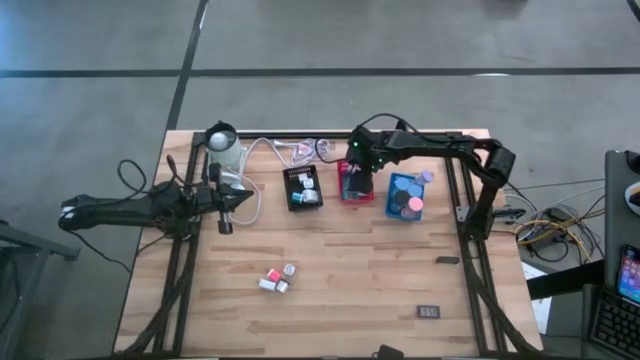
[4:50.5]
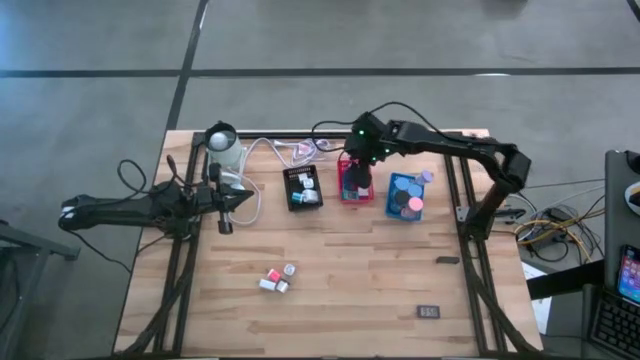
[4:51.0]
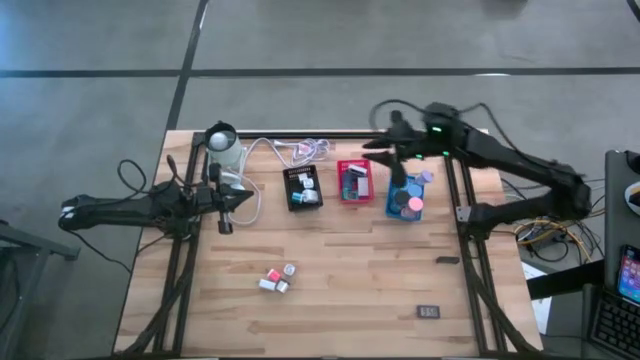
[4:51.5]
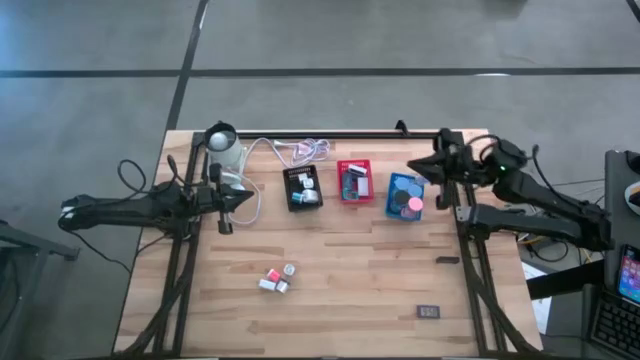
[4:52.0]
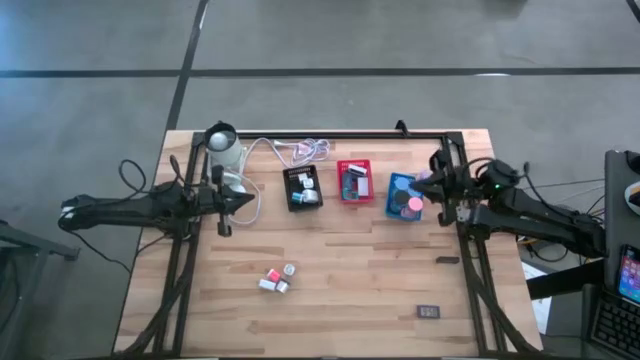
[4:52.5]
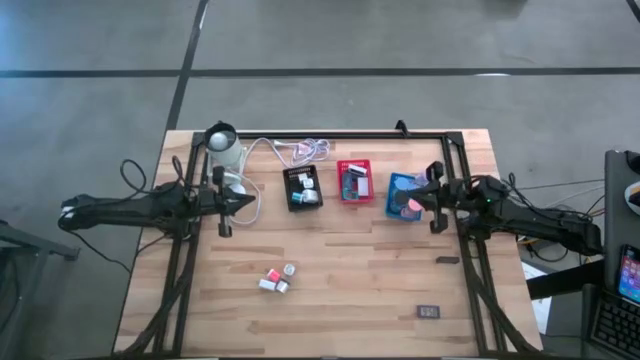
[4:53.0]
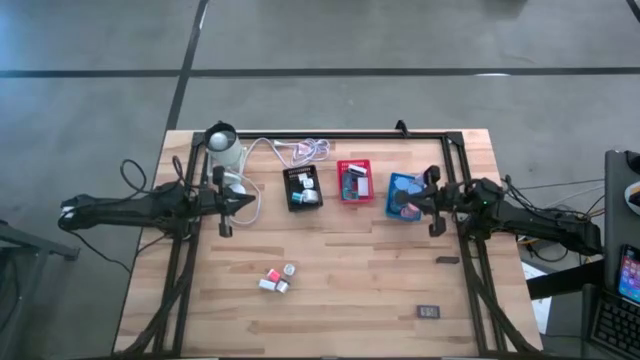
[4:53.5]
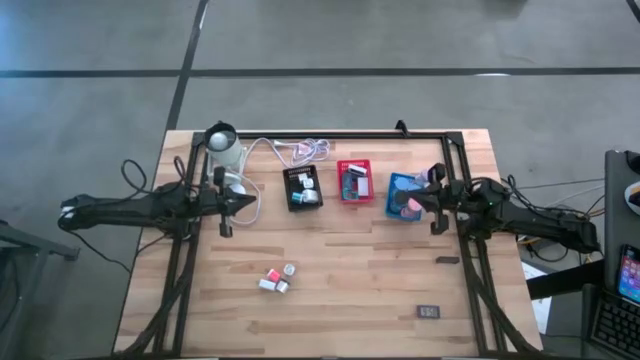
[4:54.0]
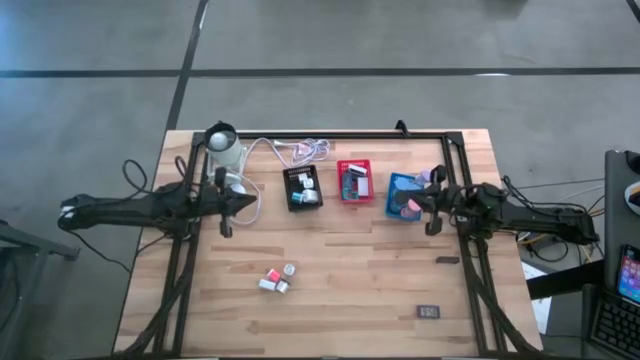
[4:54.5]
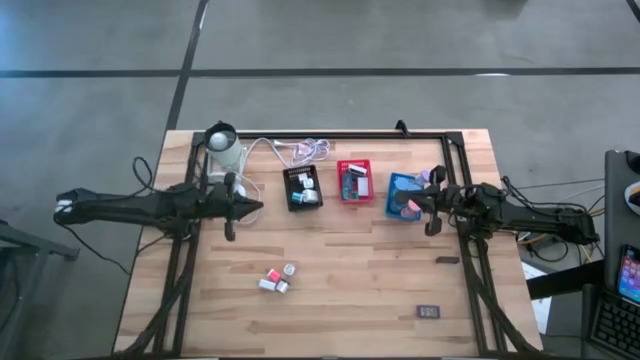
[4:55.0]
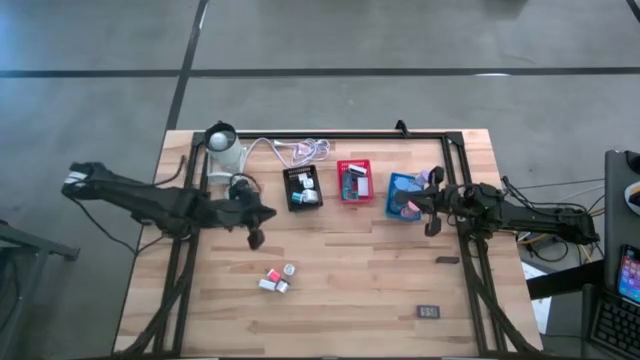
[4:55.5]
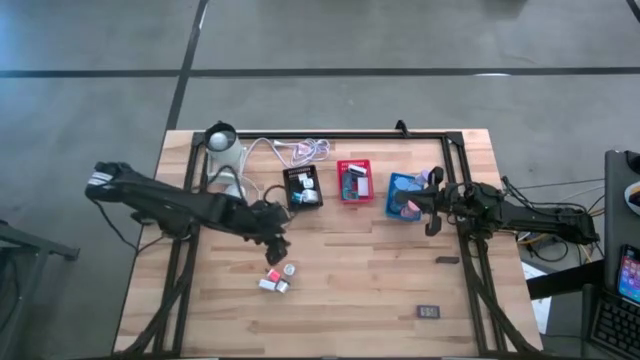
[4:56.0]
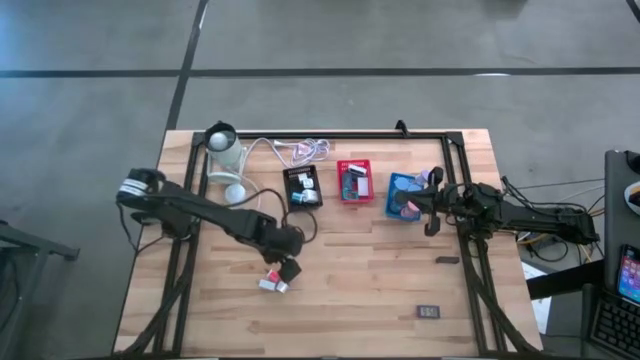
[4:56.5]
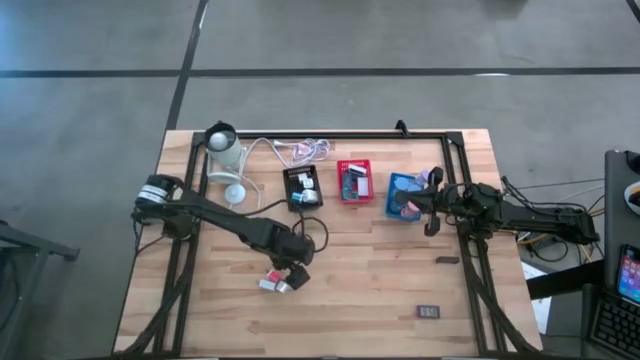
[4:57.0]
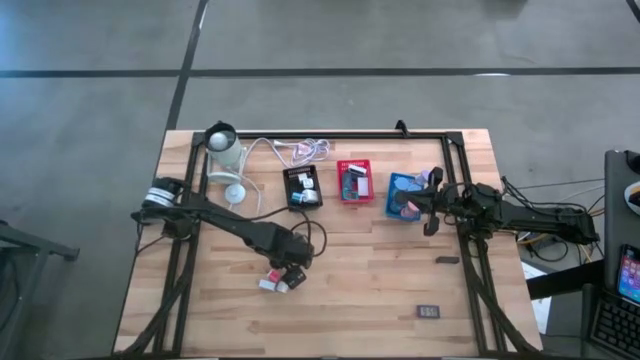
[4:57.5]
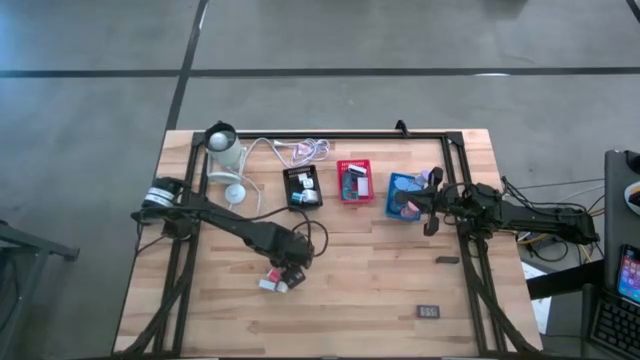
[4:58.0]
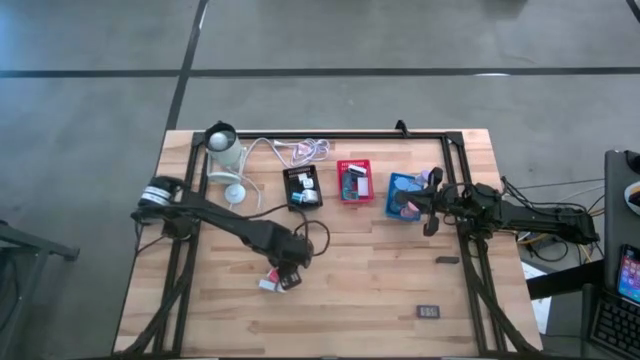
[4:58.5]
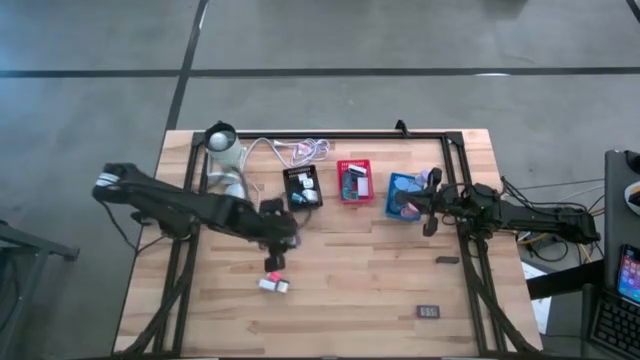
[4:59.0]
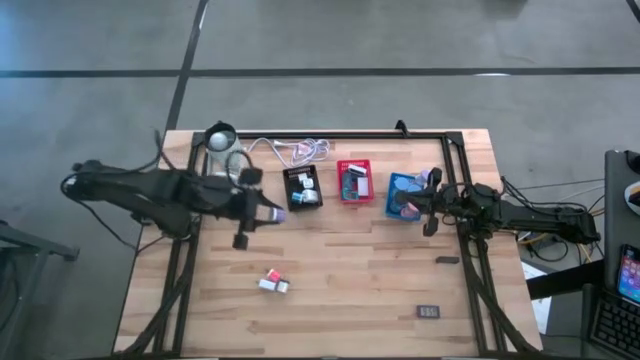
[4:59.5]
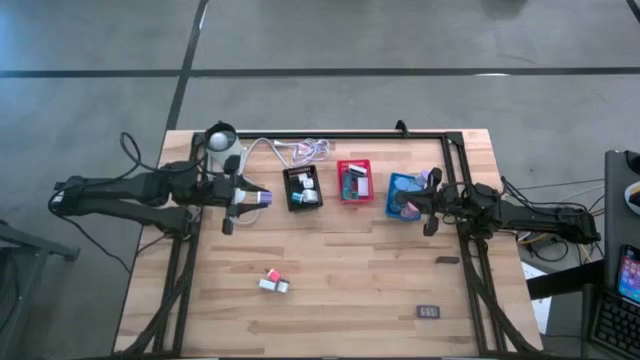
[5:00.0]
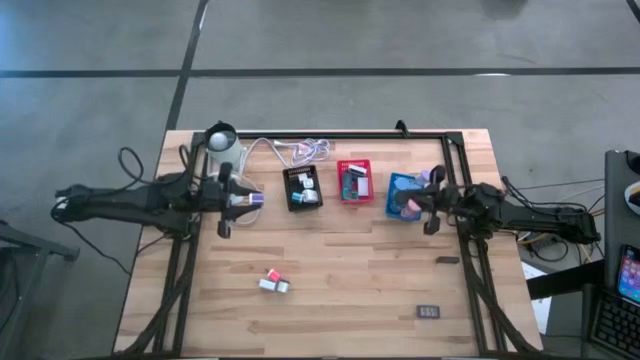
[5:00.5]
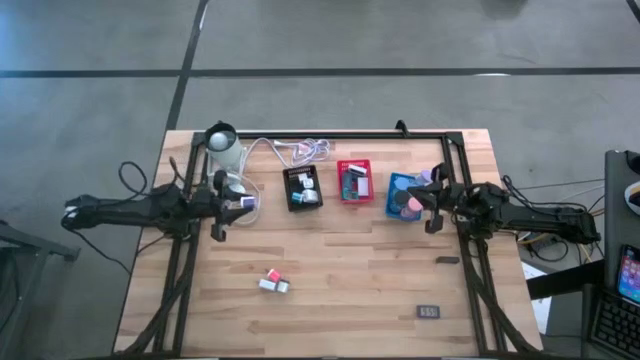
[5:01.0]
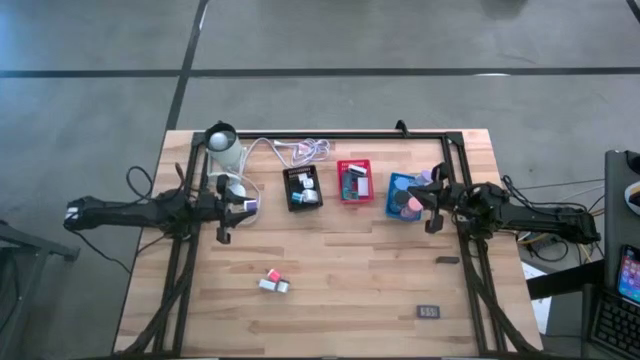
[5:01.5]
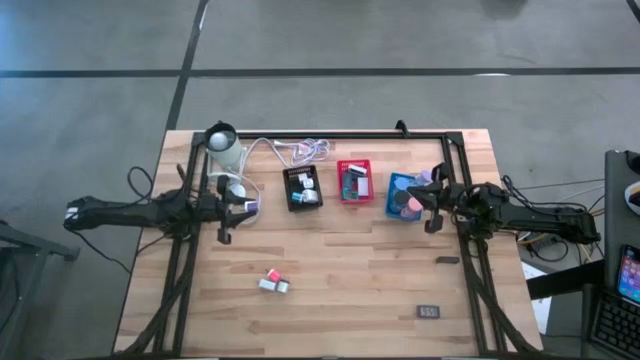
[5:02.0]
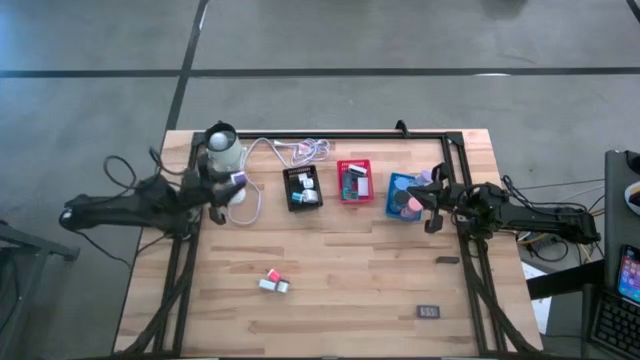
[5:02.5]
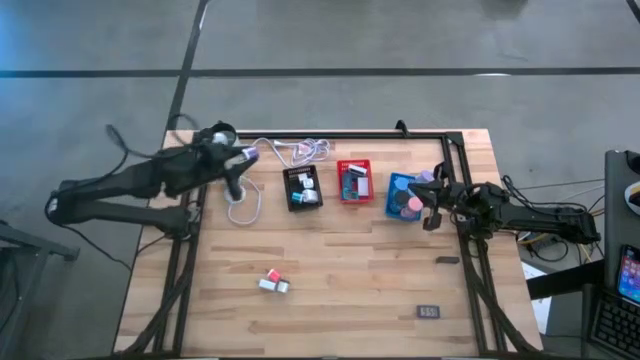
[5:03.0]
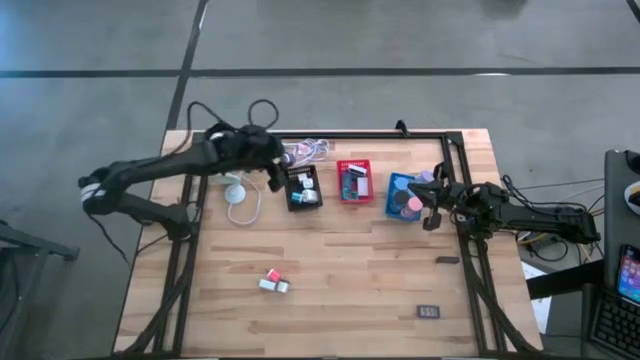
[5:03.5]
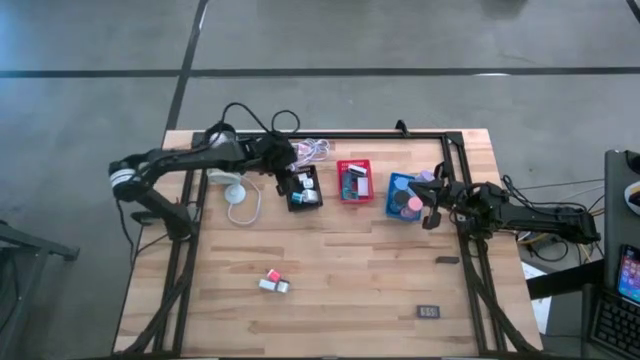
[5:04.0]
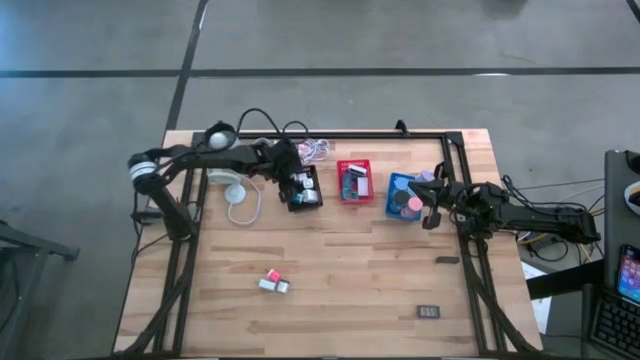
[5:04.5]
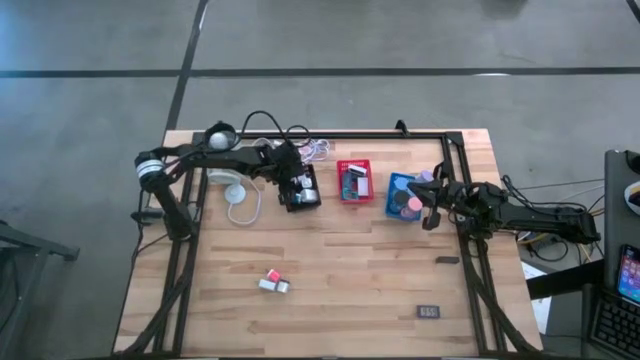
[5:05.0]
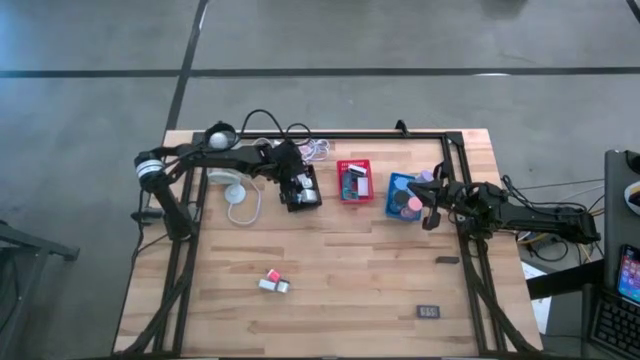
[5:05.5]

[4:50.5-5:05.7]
Task: Pick & Place Office items
Put the purple charger adapter into the black bin

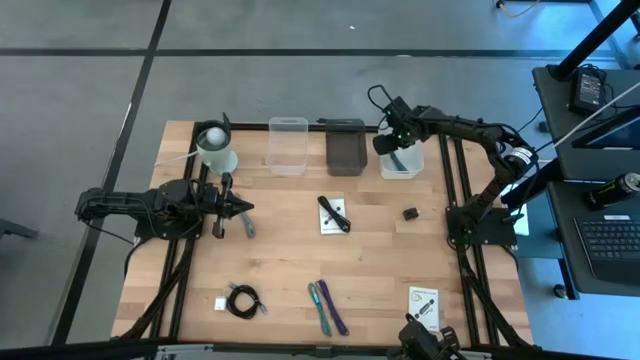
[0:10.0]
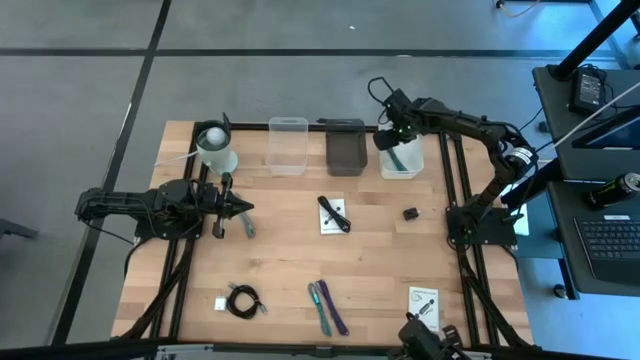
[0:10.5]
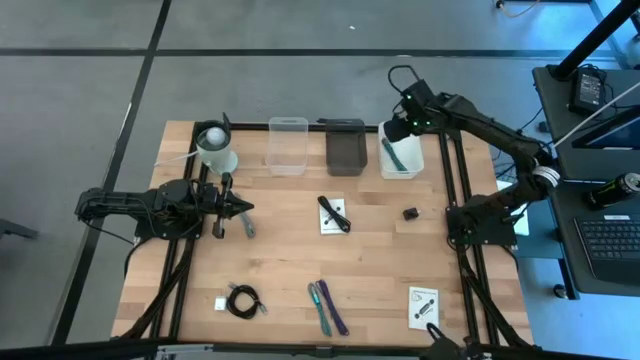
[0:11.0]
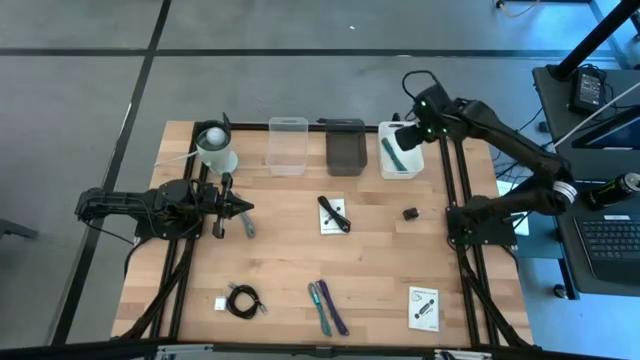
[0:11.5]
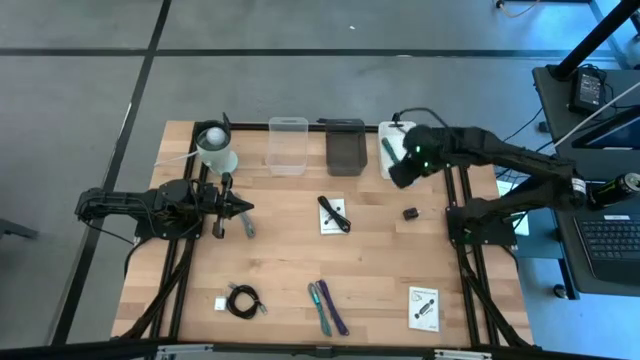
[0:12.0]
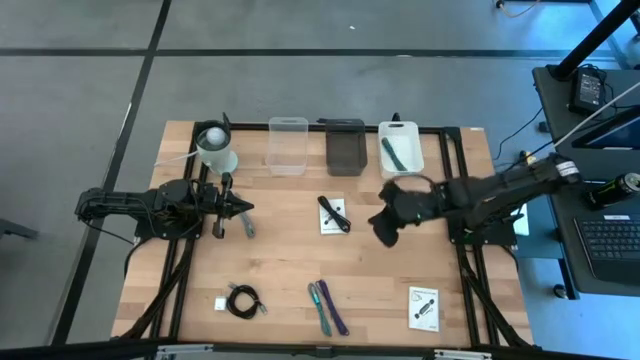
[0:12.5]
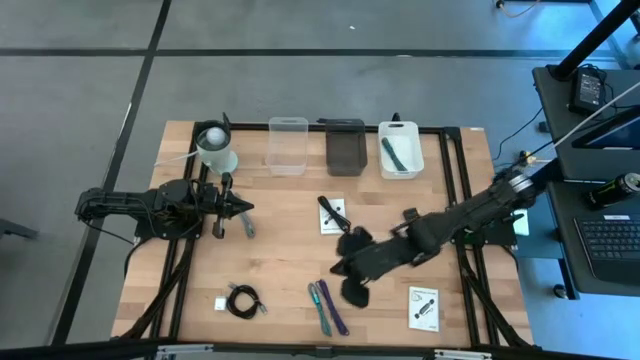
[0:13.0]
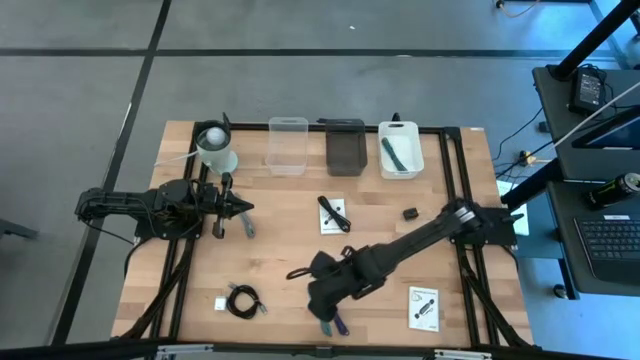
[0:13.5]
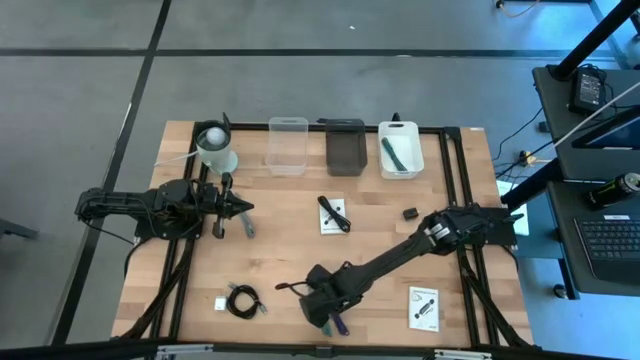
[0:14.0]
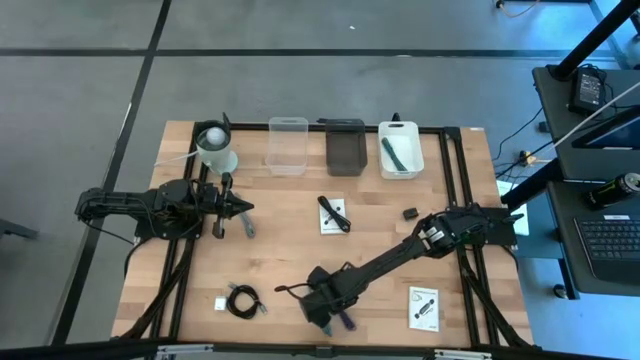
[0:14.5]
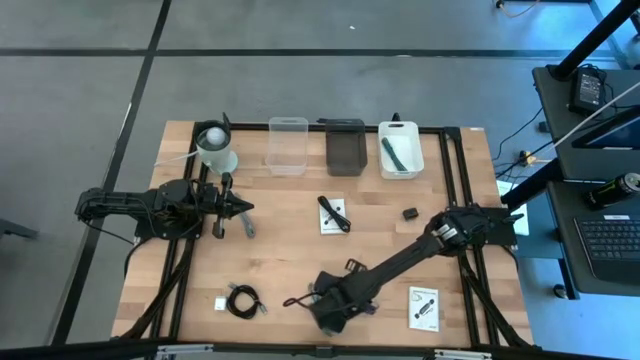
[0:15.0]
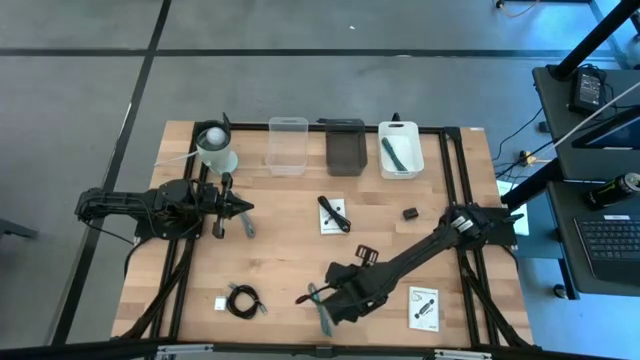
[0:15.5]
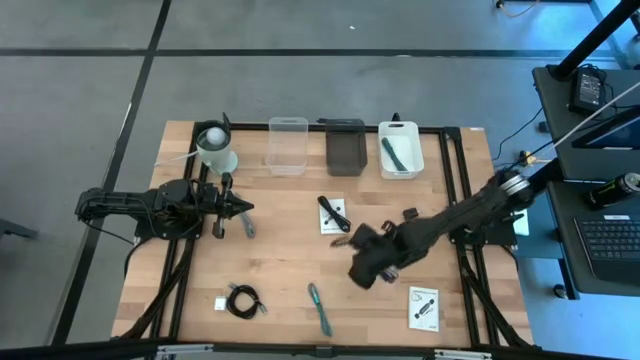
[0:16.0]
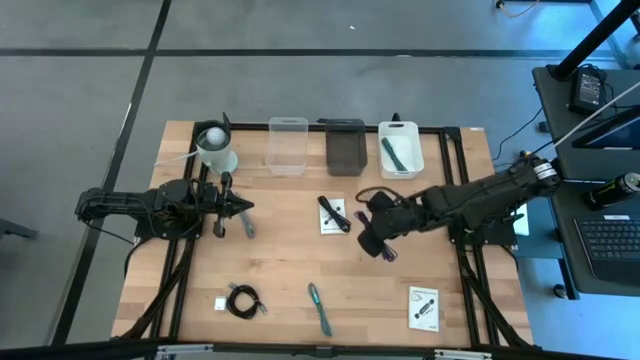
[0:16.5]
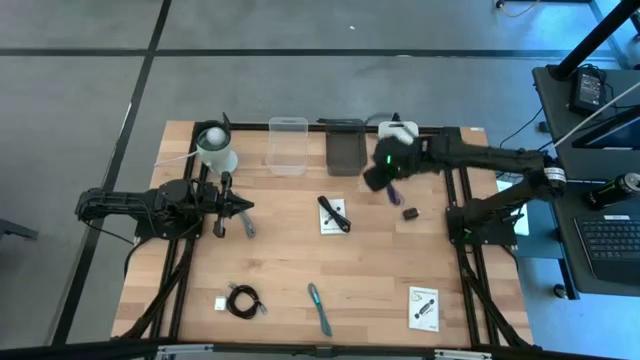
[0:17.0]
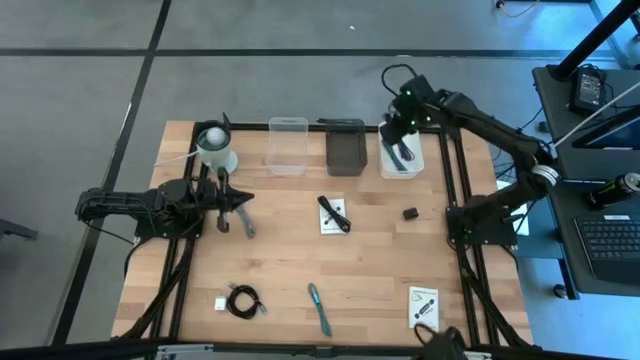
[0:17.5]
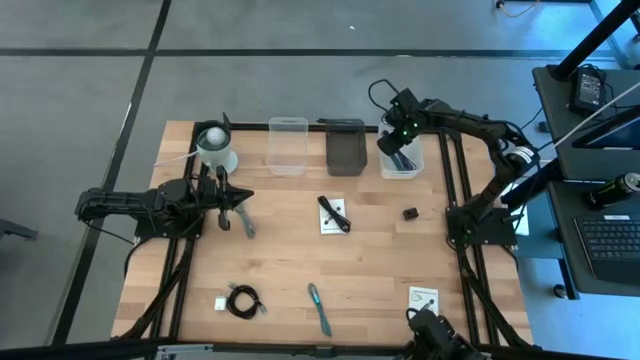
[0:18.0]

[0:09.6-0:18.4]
Task: Pick and place items into bin
Put the violet charger cable into the white bin
